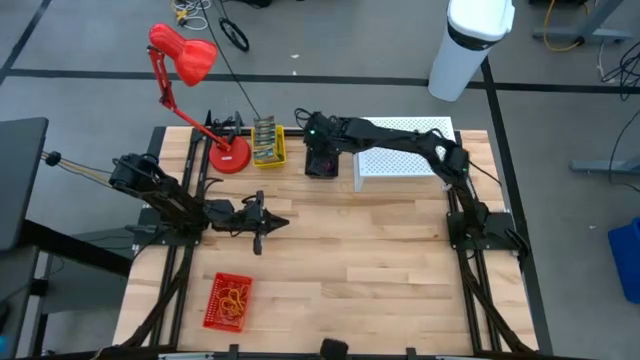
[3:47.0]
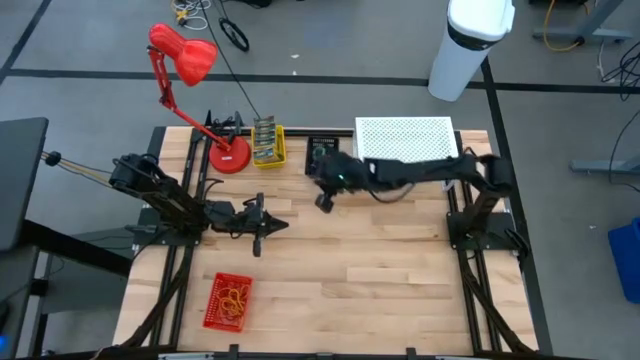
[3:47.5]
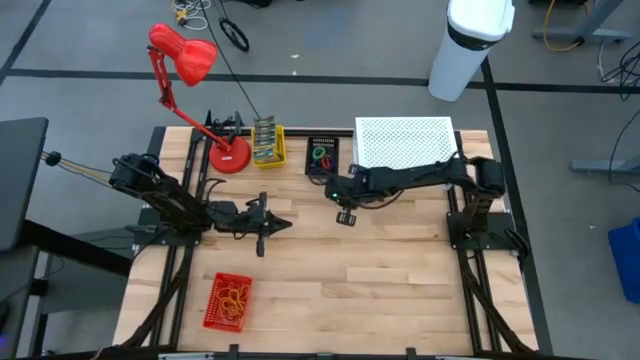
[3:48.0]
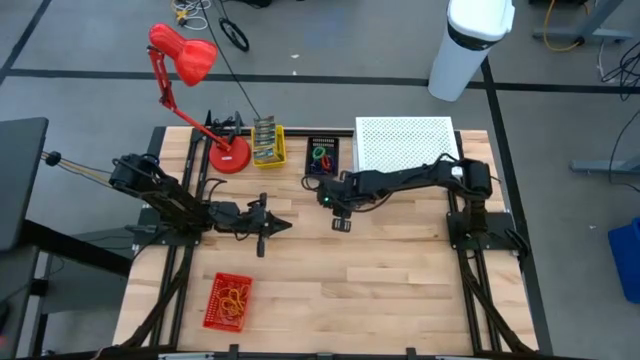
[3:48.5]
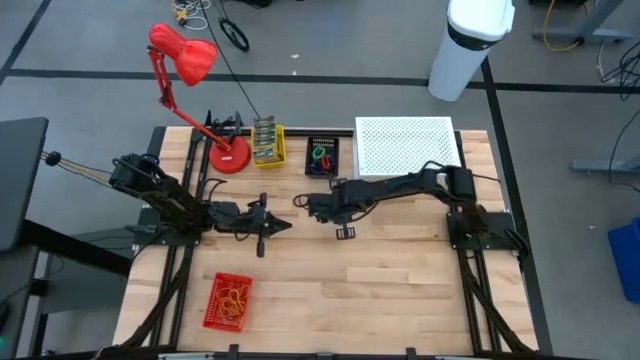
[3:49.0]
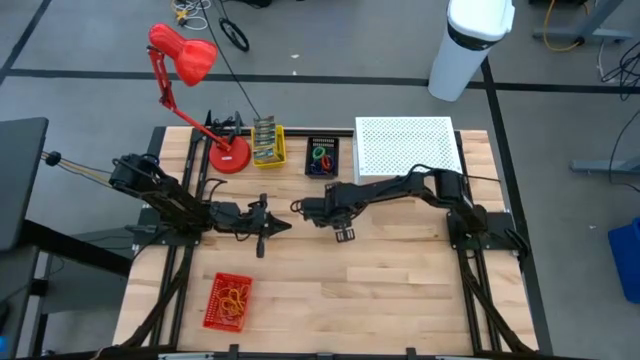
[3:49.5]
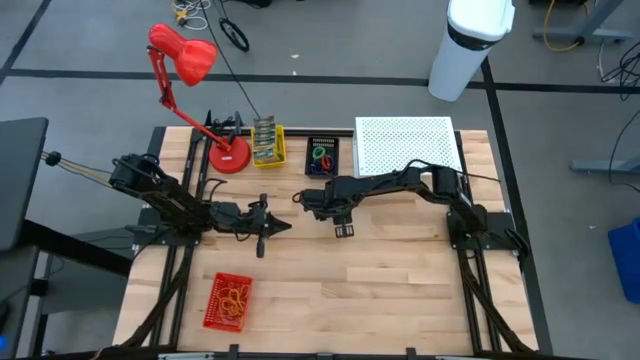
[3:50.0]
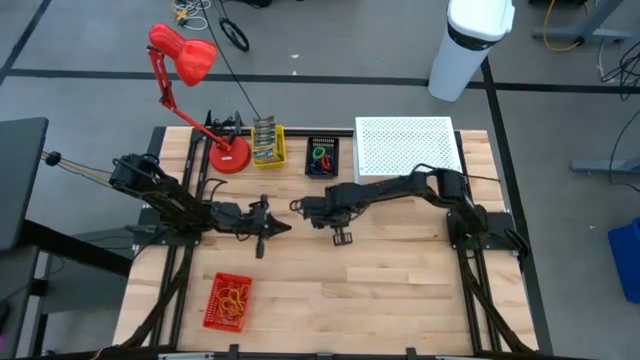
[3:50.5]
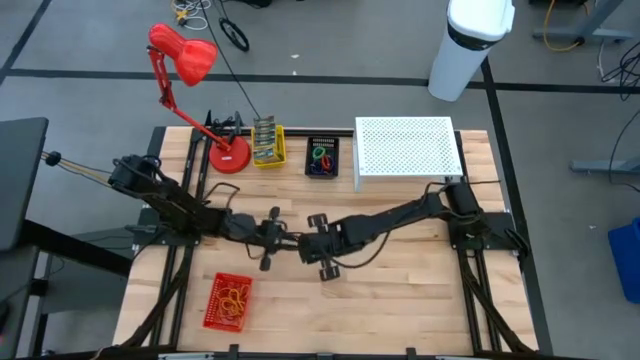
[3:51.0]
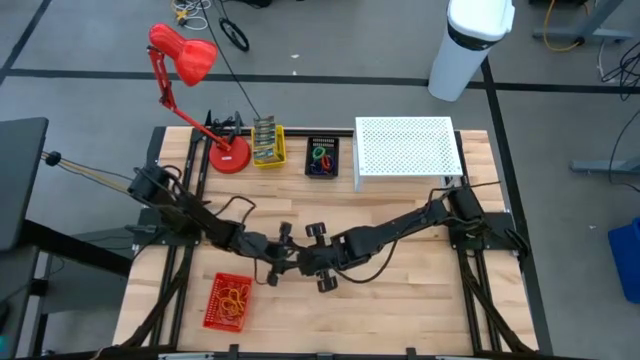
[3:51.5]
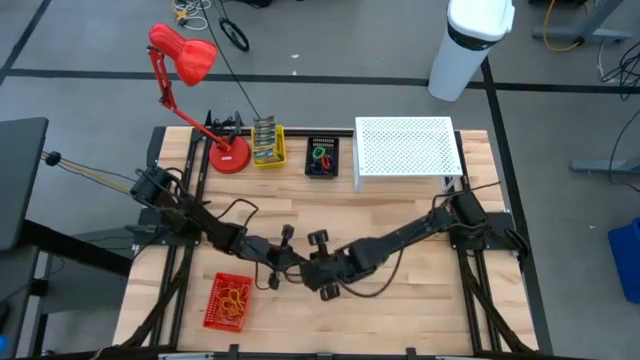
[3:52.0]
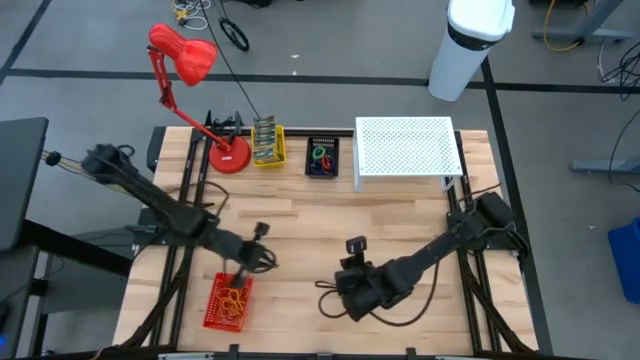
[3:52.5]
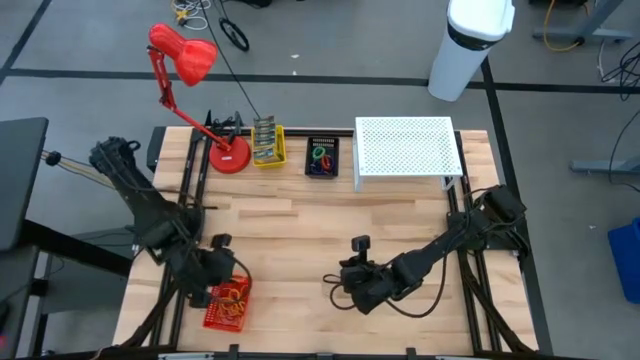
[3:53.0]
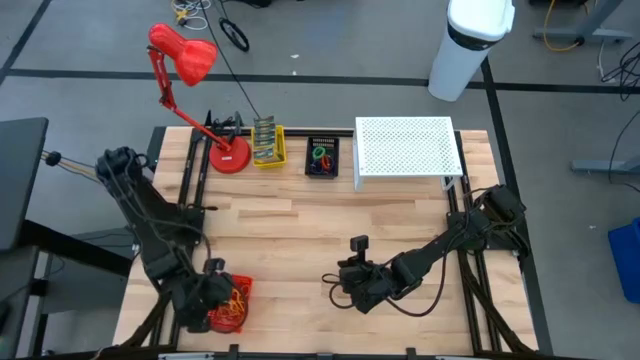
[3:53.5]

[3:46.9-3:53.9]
Task: Pick & Place Office Desk Supplies
Put the yellow rubber band into the red bin

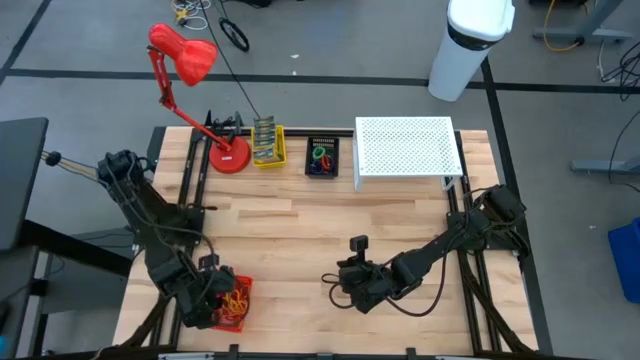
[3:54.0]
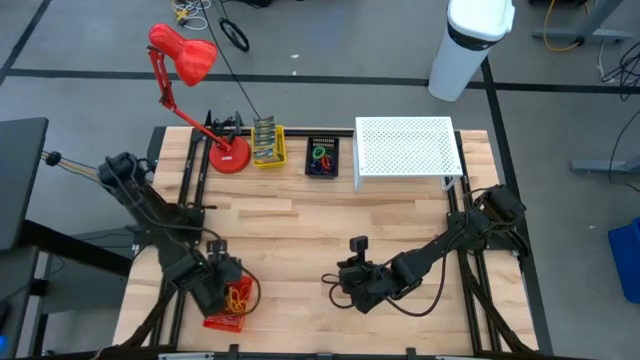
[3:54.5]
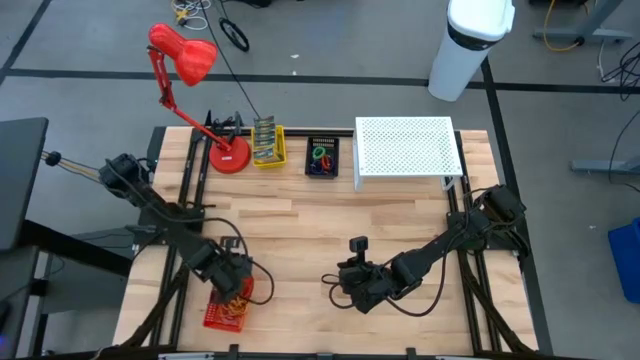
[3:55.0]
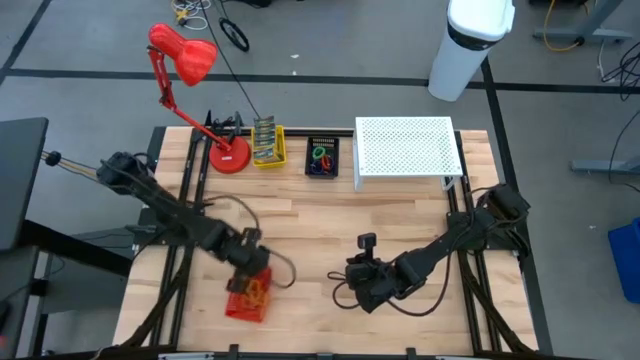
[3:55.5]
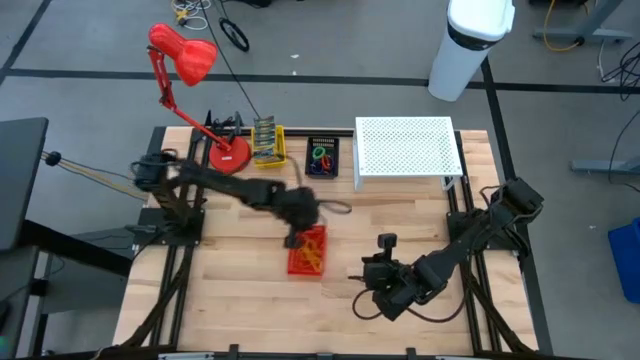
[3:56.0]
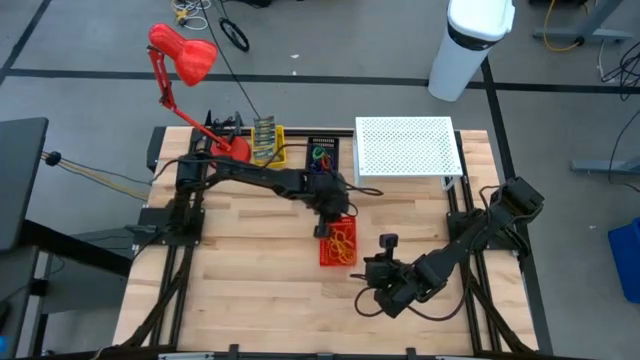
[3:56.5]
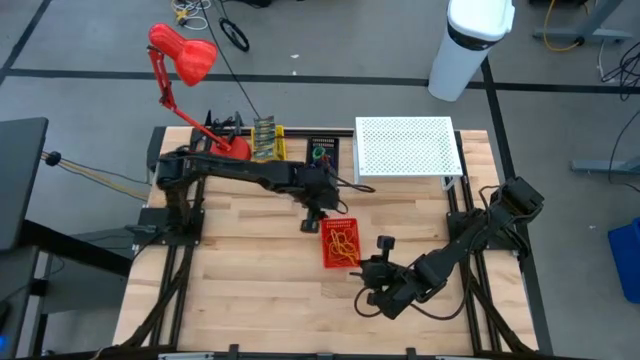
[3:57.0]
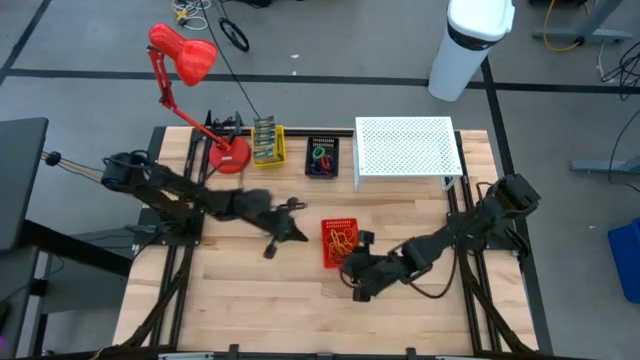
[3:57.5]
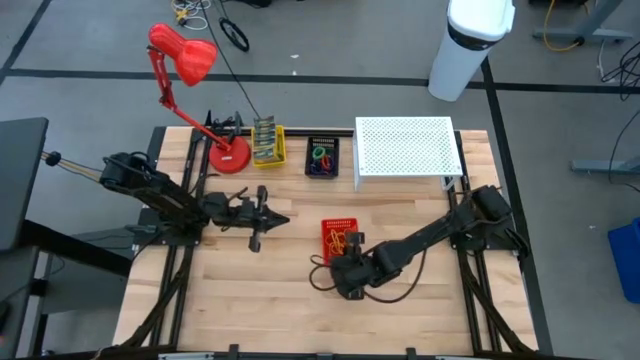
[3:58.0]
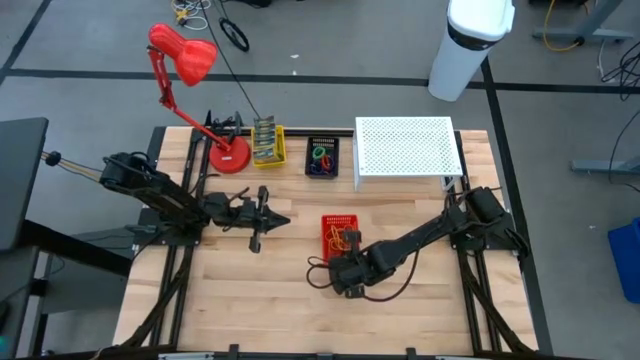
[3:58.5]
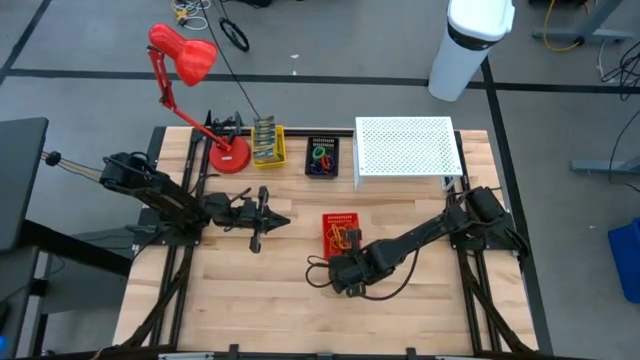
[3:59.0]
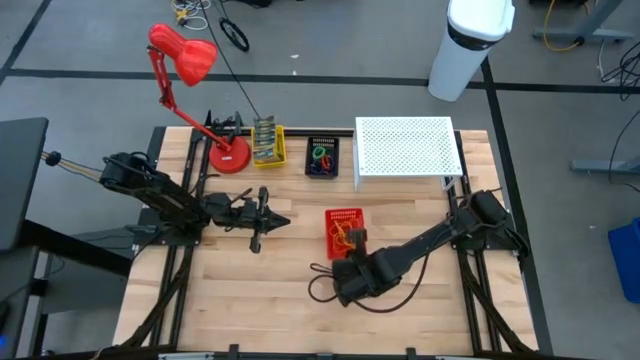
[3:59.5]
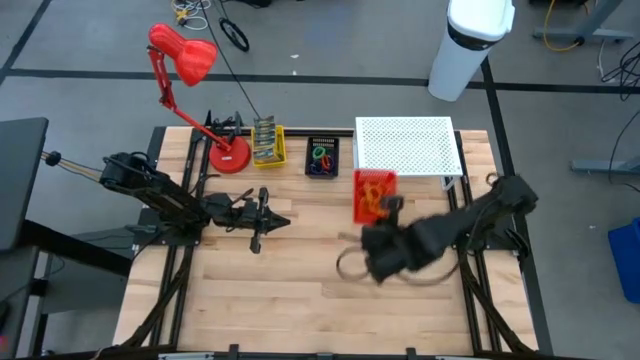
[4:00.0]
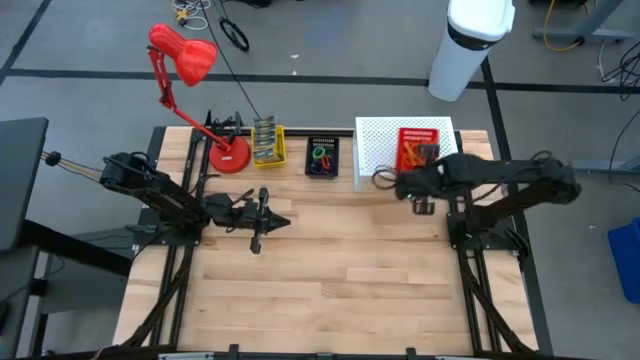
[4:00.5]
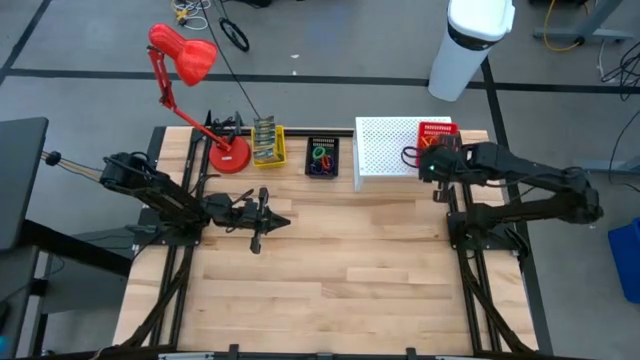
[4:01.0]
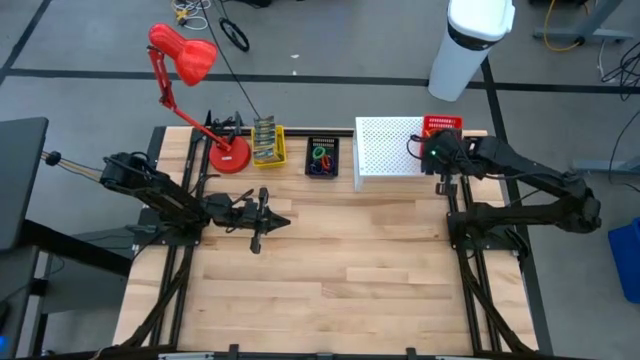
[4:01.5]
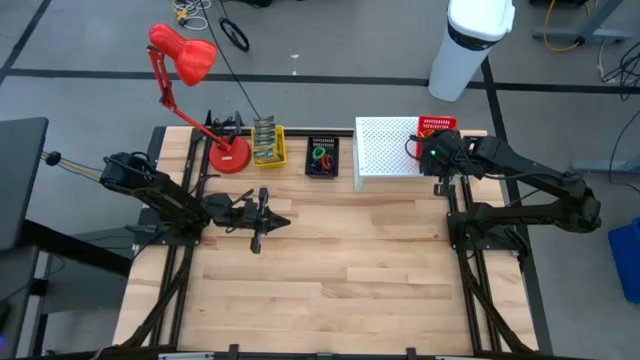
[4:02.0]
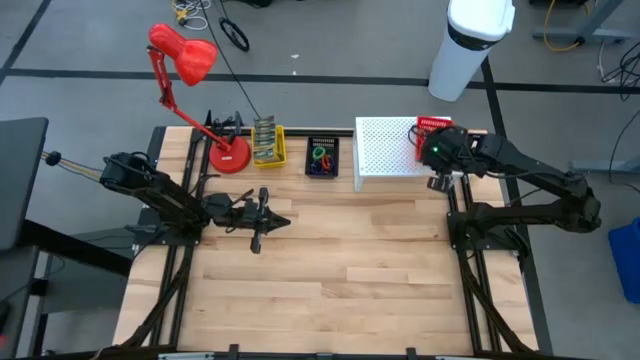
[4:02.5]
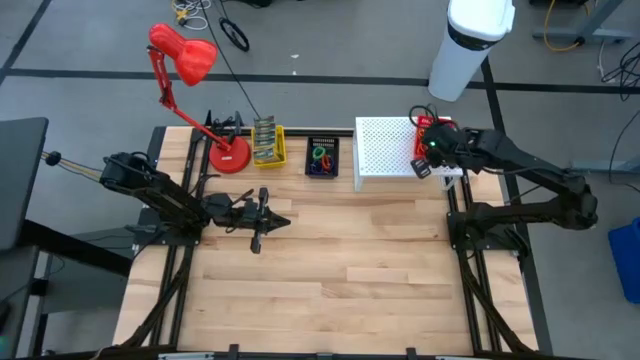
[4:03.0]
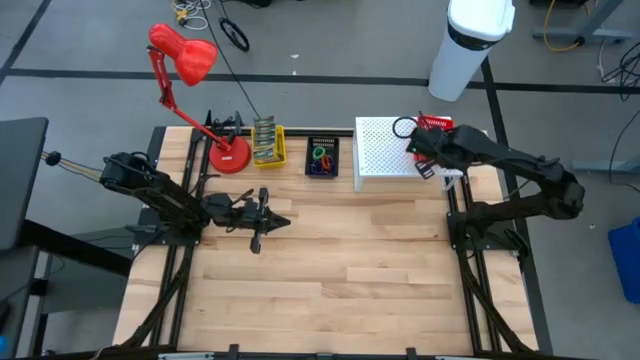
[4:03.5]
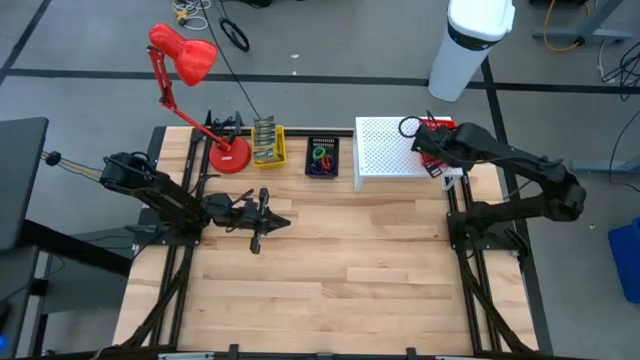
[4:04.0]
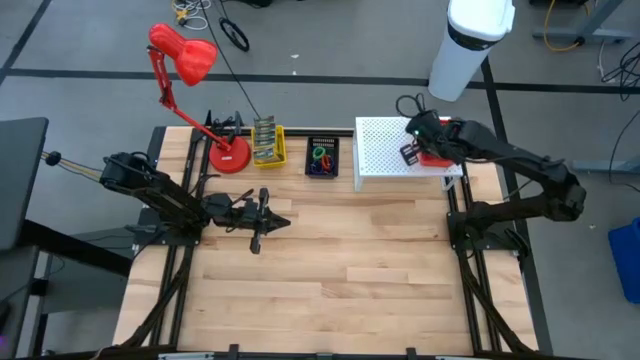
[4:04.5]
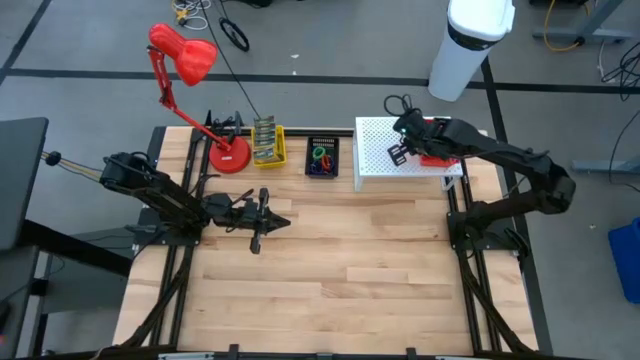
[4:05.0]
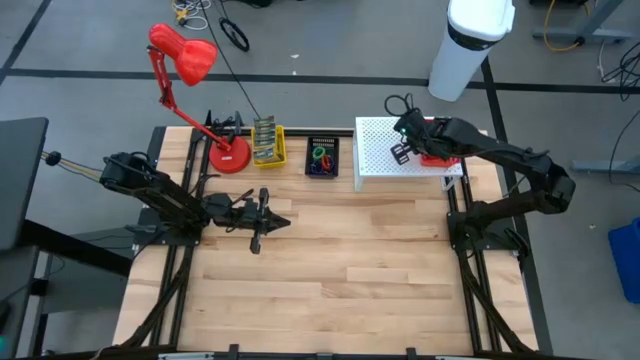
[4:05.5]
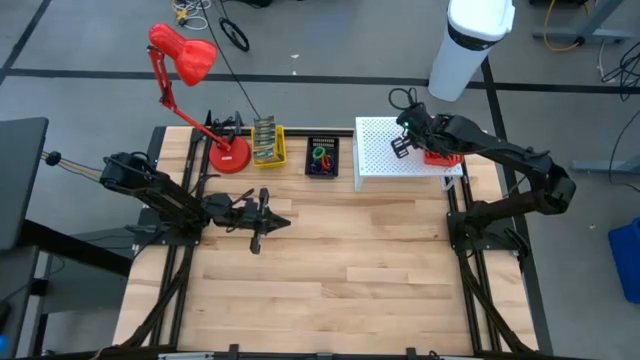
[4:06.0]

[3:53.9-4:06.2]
Put the red bin with the rubber bands onto the white shelf
